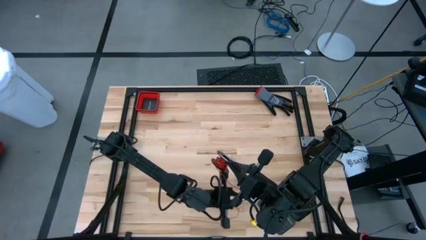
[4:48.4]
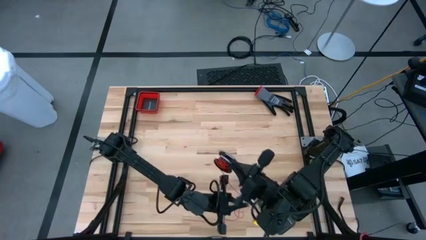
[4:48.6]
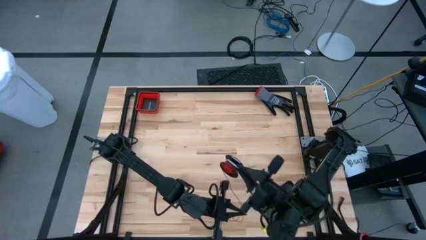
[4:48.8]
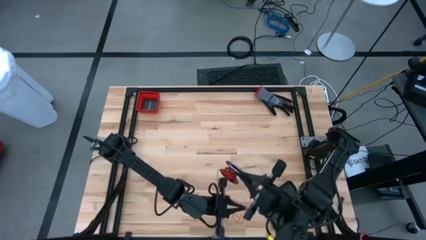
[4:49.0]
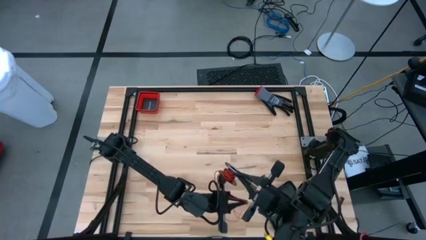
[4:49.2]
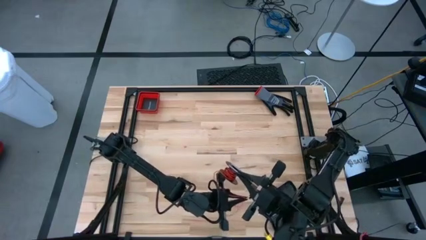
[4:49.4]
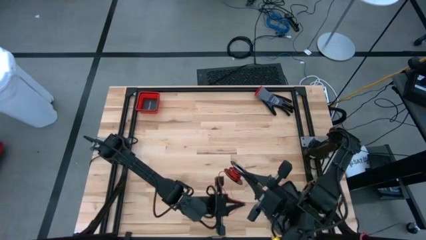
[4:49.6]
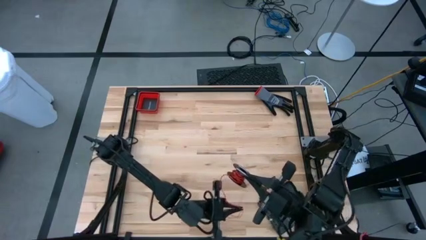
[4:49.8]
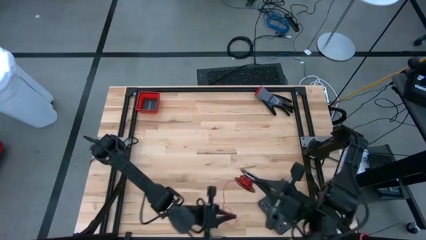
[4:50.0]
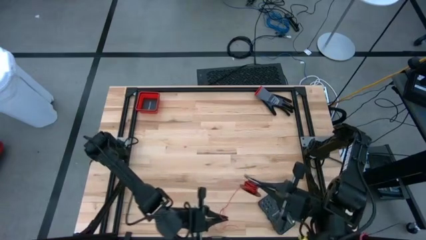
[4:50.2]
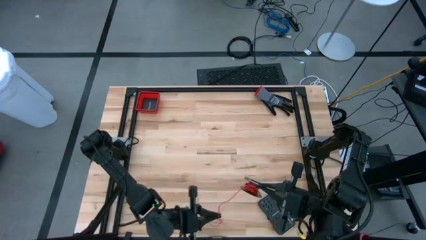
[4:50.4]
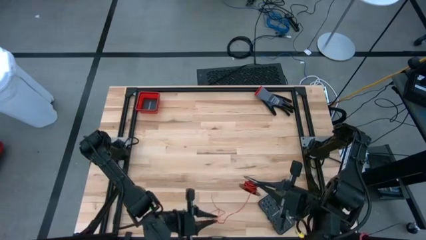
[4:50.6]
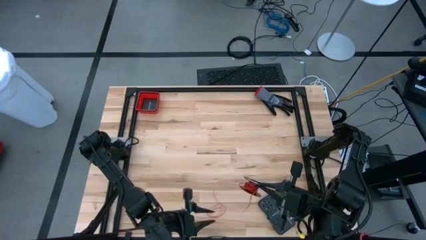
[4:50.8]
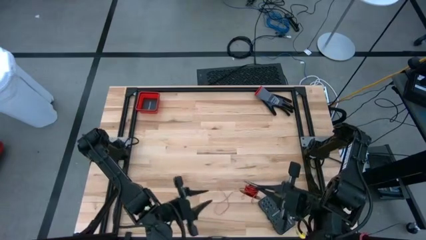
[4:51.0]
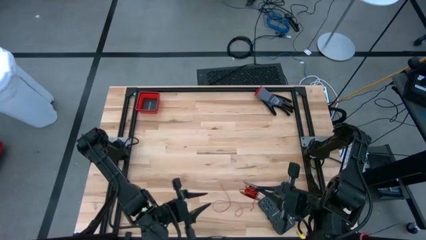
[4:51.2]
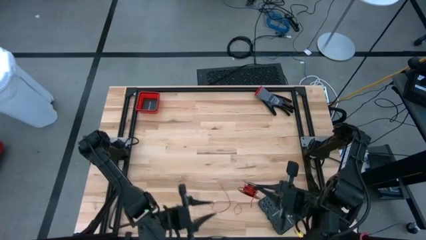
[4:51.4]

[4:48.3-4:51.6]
Task: Coil cords
Coil the red wire onto the spool

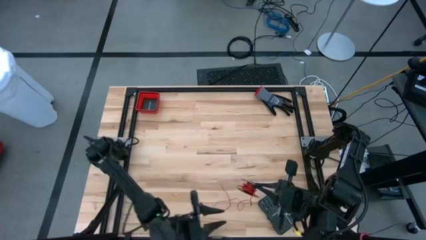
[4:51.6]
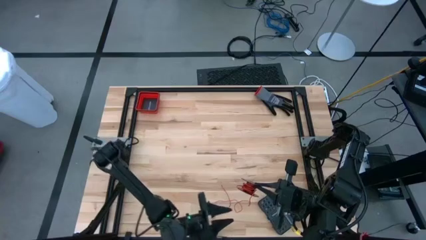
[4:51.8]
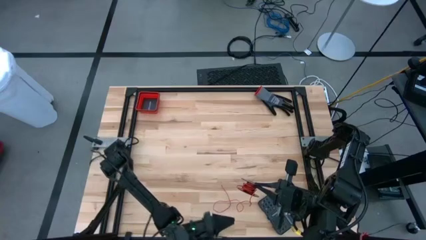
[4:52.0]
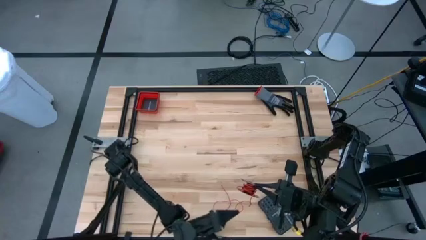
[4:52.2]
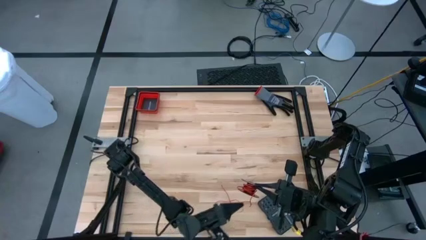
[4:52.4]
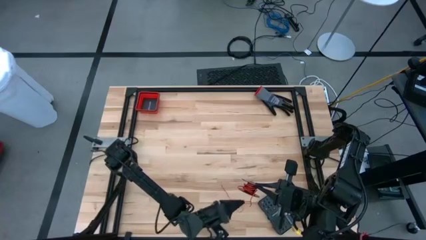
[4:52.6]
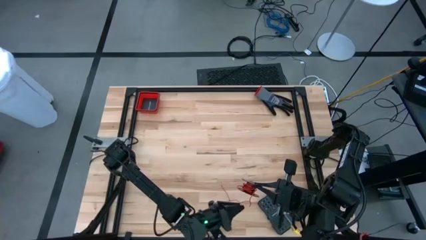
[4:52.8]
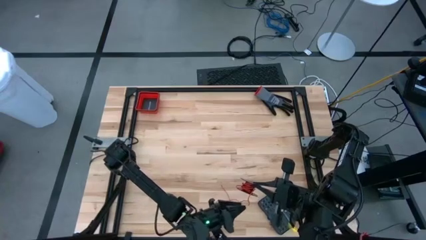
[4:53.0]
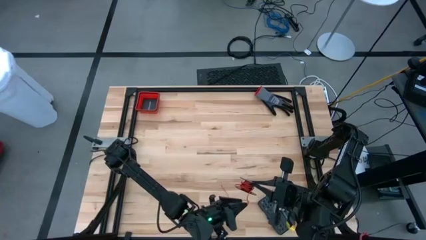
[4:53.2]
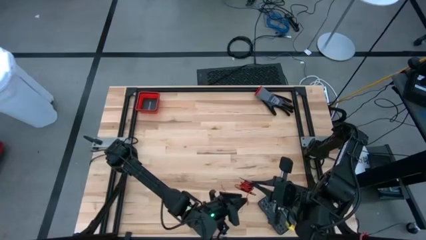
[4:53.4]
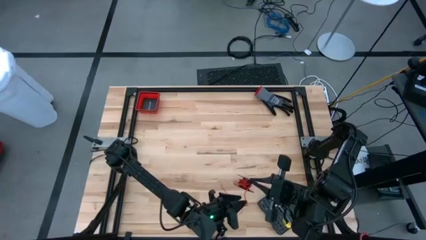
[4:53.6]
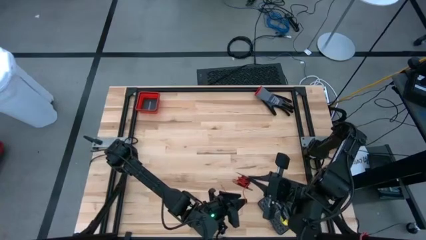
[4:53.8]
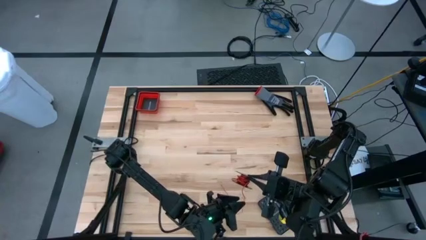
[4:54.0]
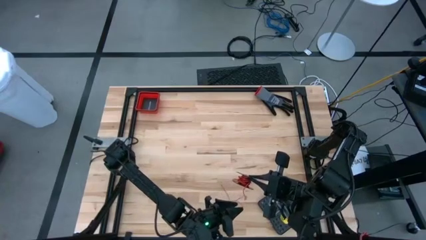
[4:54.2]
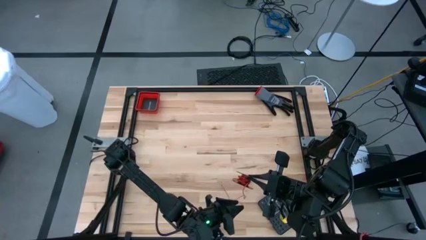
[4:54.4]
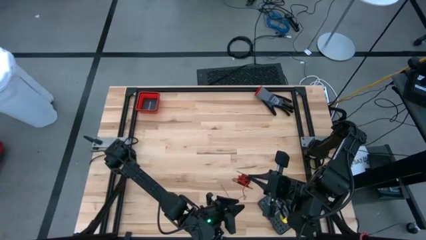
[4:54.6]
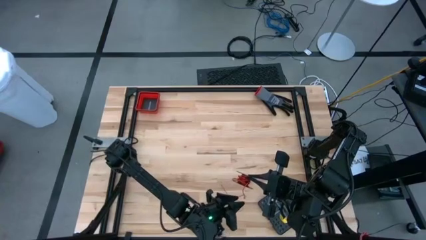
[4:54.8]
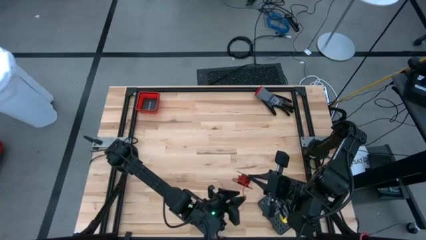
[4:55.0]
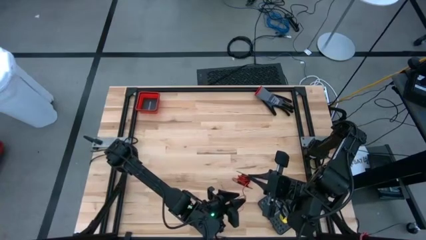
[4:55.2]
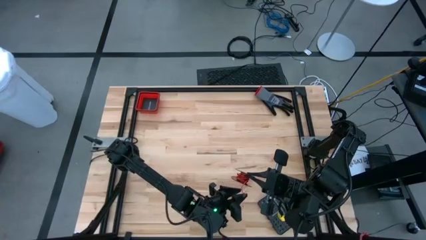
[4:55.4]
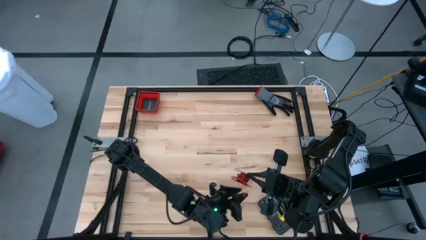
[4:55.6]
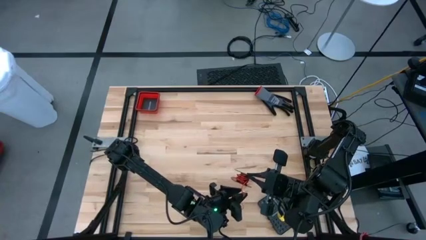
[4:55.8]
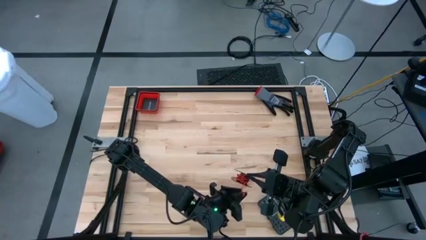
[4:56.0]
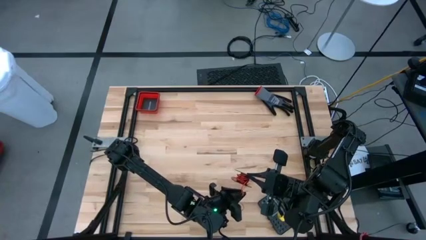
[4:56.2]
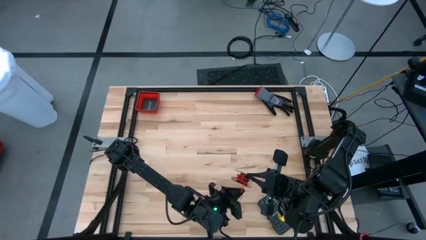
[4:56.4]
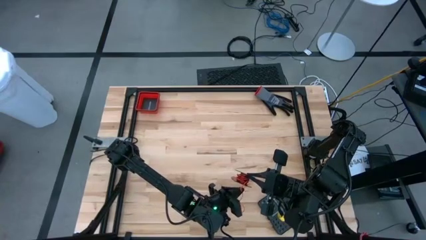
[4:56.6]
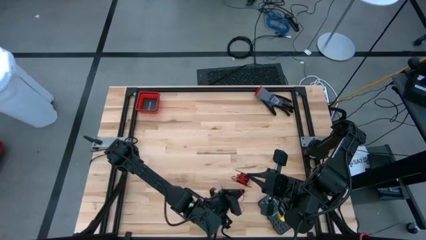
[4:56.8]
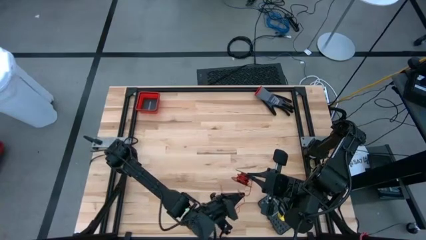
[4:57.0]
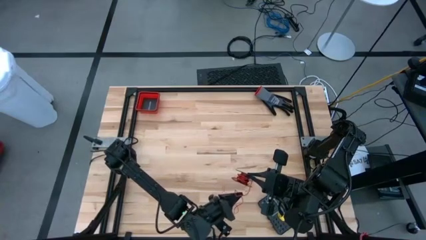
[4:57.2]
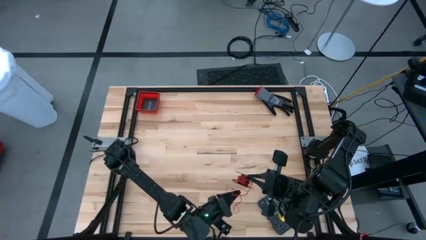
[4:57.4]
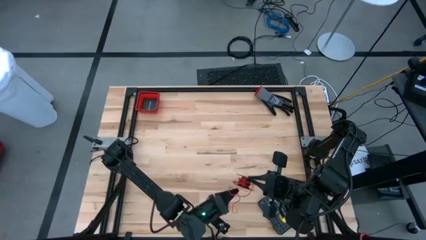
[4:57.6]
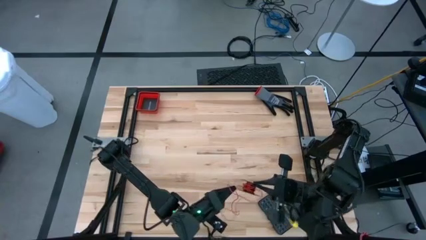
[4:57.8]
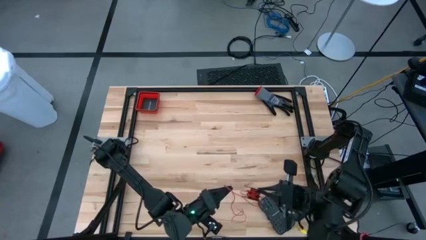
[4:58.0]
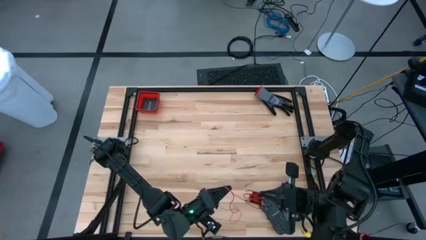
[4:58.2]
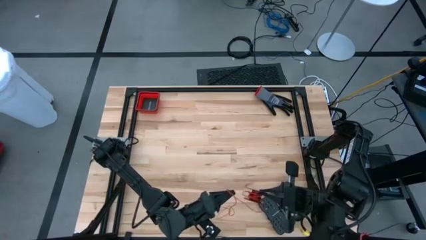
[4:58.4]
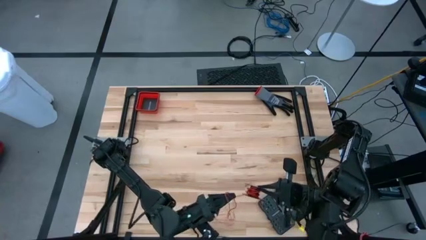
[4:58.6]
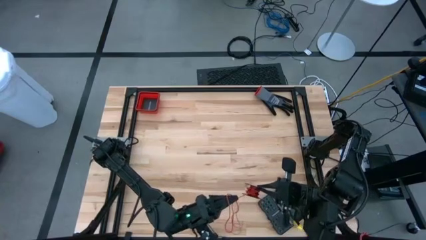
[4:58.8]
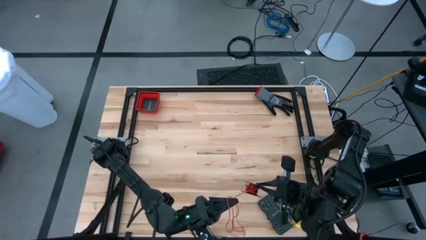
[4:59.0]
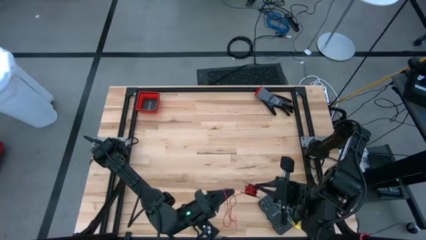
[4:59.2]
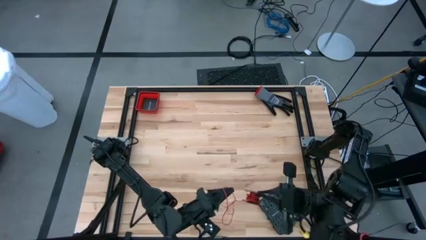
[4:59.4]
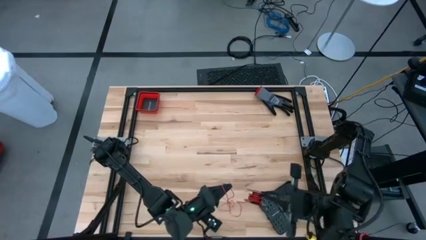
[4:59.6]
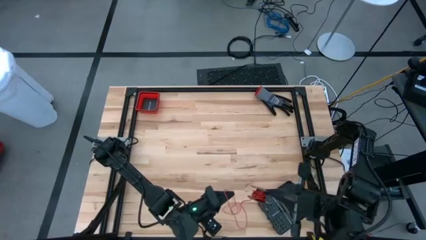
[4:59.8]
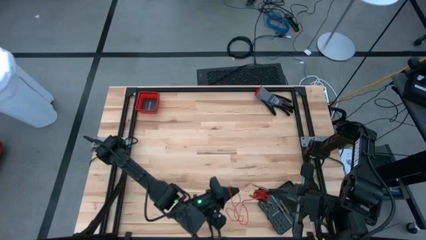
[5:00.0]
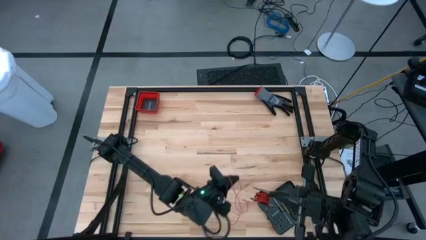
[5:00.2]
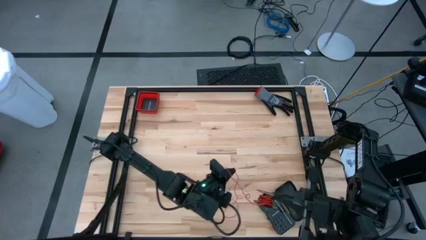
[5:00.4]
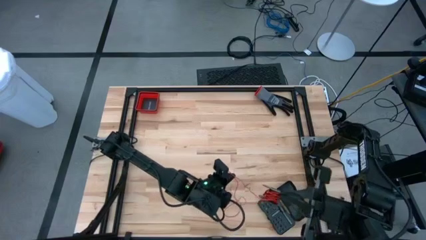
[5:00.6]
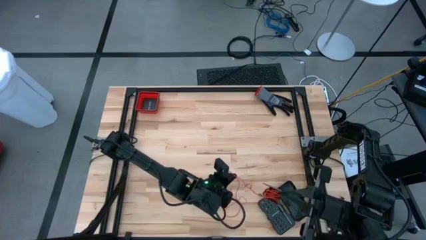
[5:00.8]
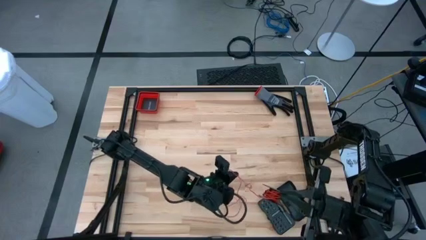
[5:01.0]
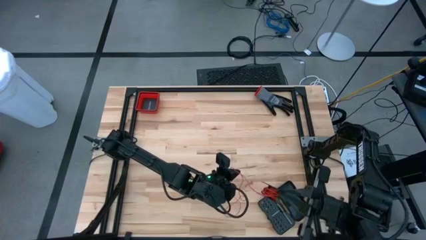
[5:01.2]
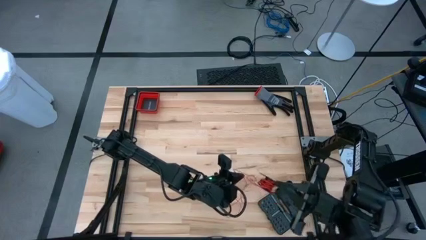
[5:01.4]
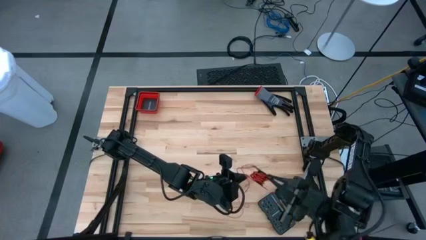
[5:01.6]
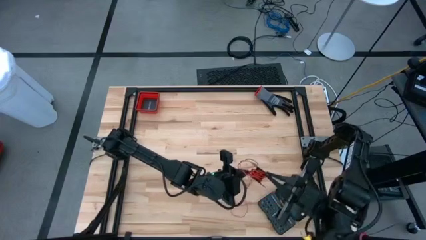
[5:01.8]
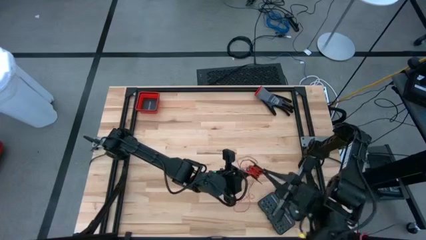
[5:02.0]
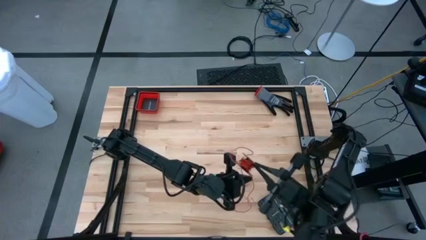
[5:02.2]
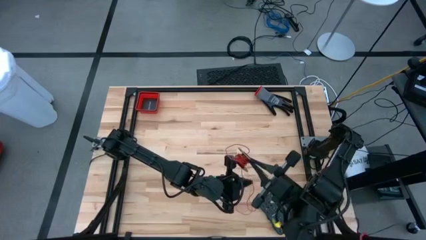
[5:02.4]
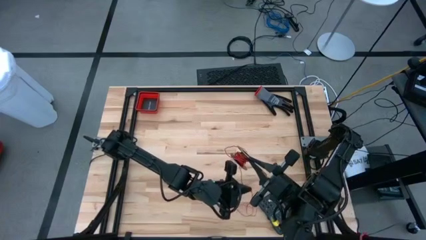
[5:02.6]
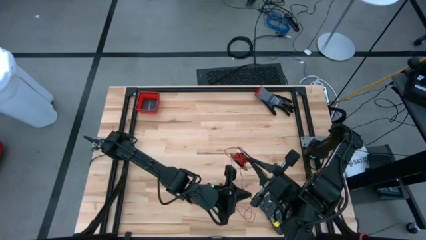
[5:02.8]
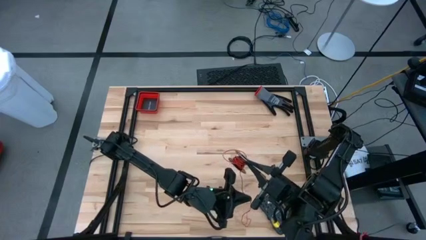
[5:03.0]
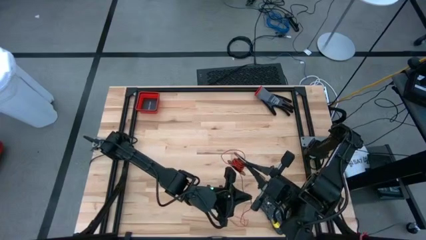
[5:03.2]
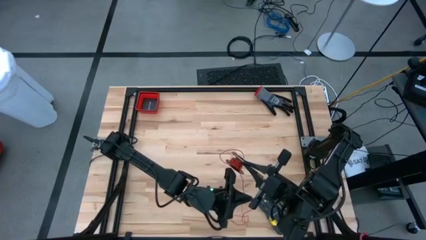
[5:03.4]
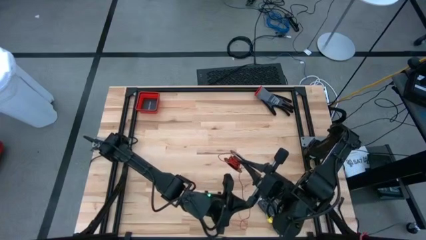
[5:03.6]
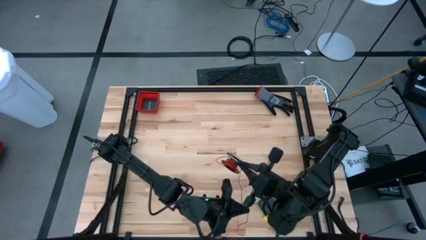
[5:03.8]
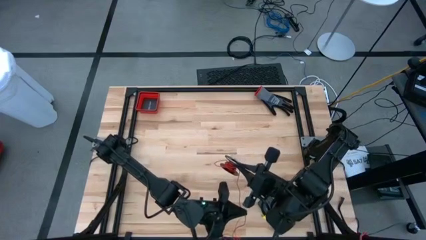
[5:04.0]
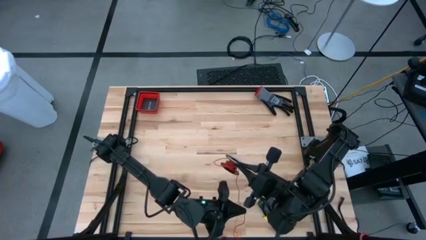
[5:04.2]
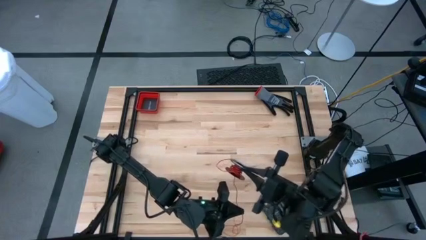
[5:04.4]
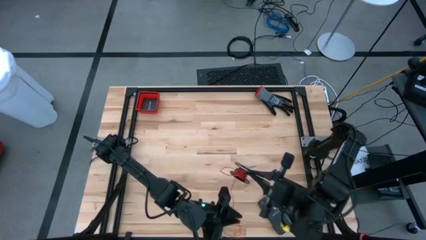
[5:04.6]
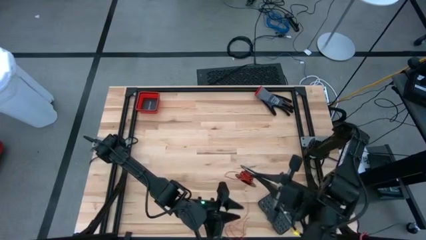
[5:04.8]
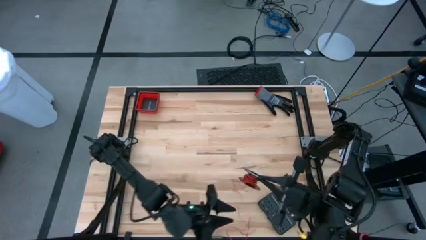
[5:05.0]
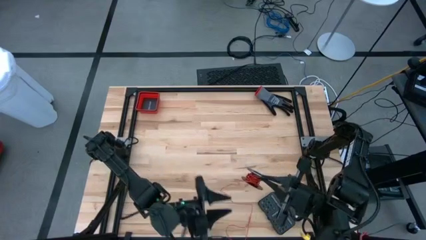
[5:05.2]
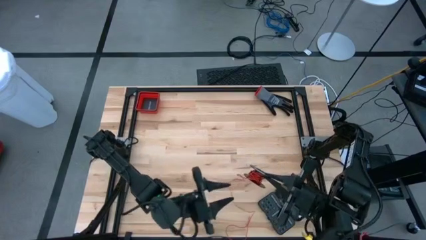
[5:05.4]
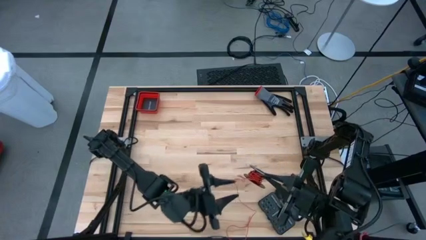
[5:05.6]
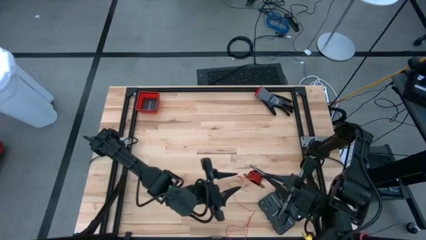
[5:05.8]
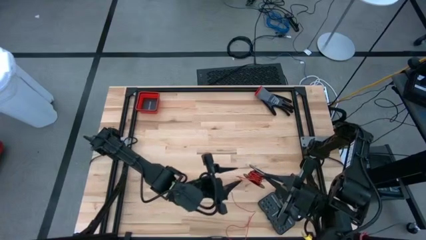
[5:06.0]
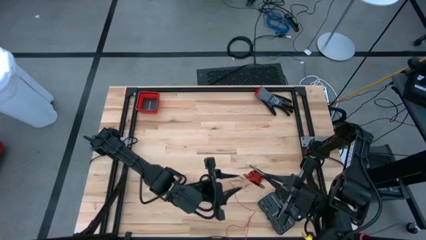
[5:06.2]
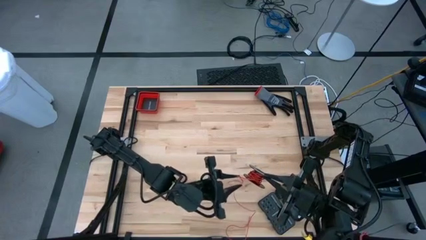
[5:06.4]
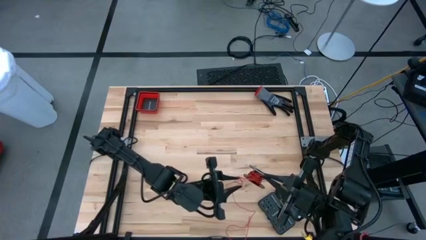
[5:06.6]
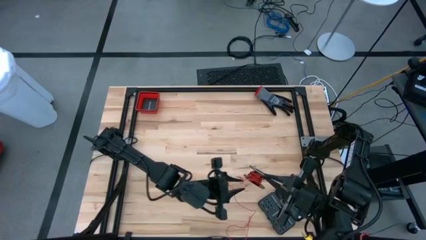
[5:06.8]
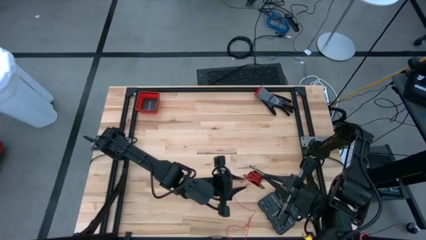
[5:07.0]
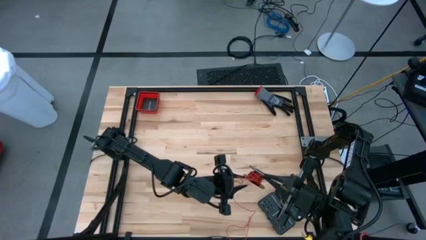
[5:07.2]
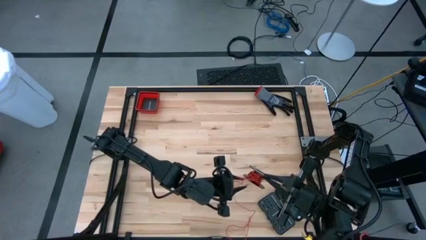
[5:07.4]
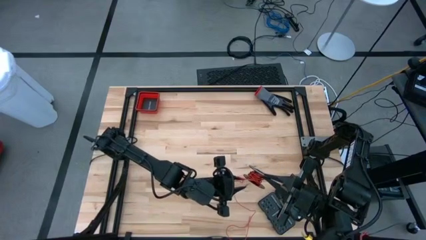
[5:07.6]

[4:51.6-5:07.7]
Coil the red wire onto the spool
